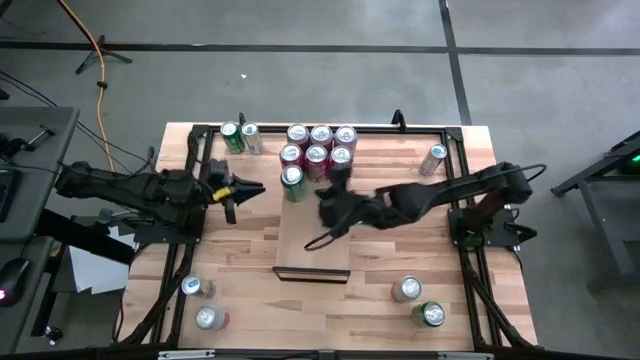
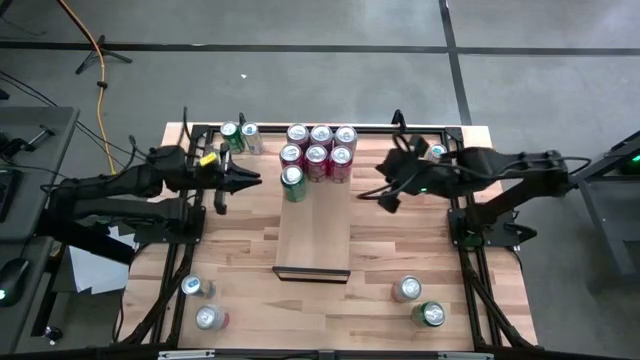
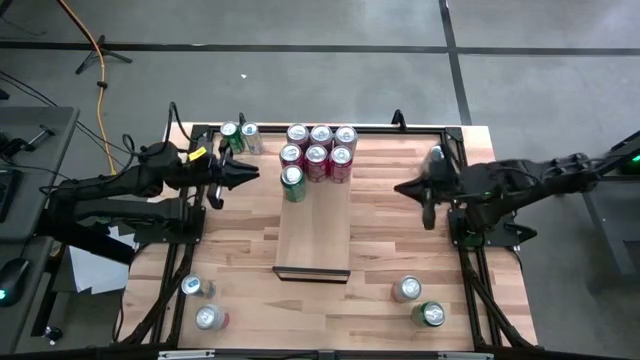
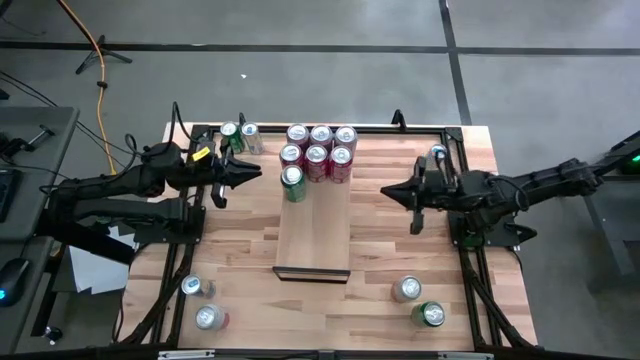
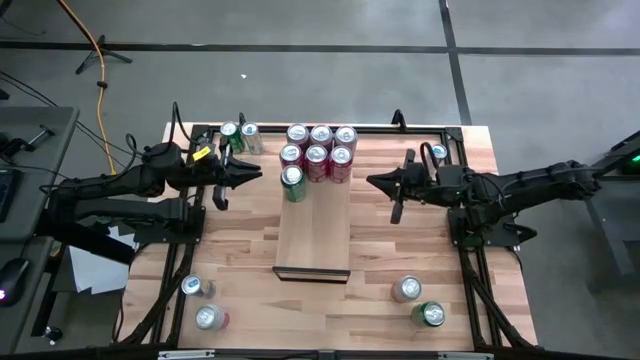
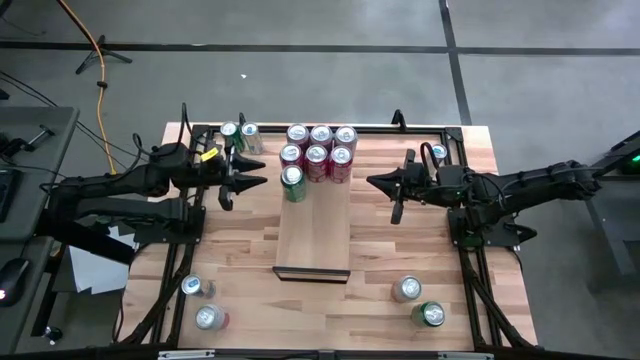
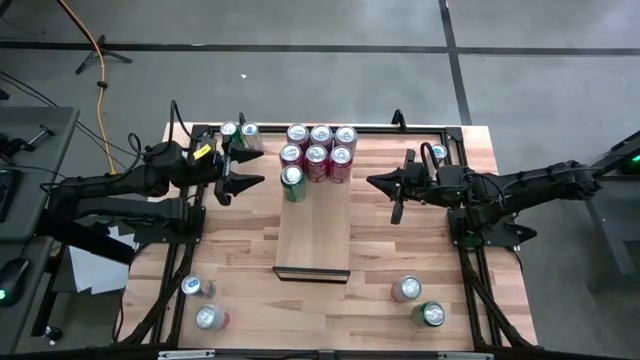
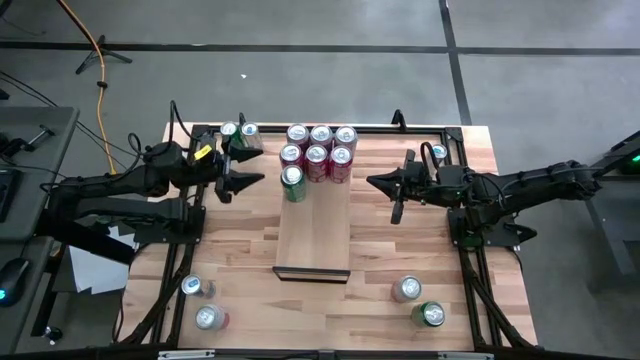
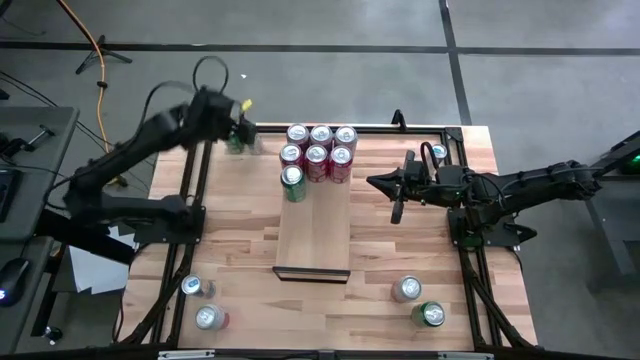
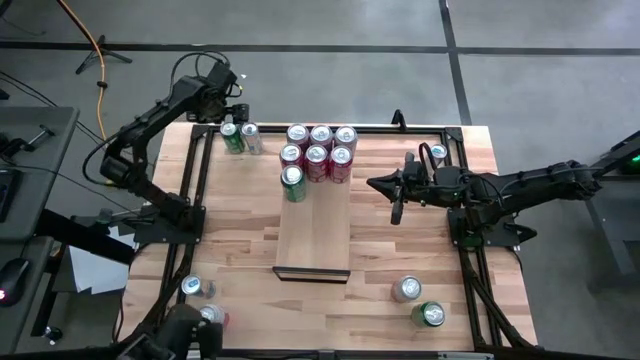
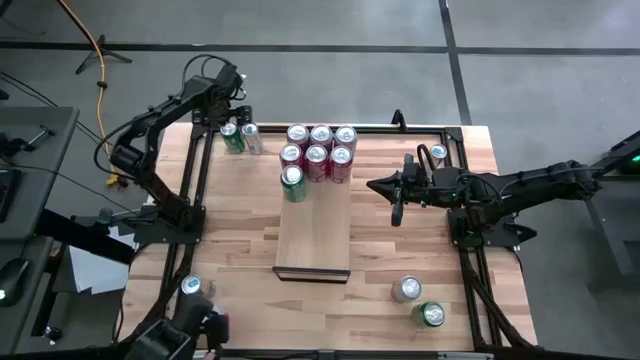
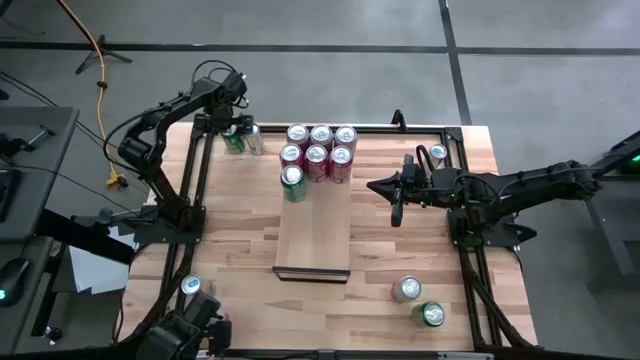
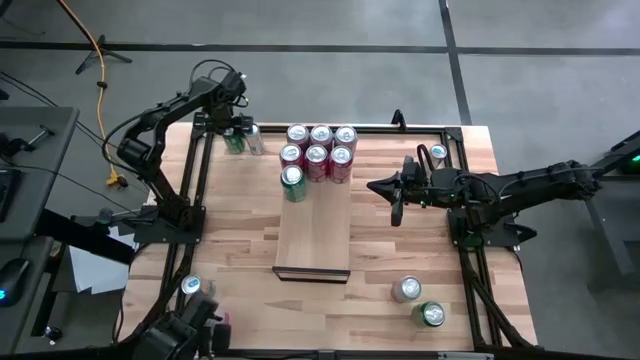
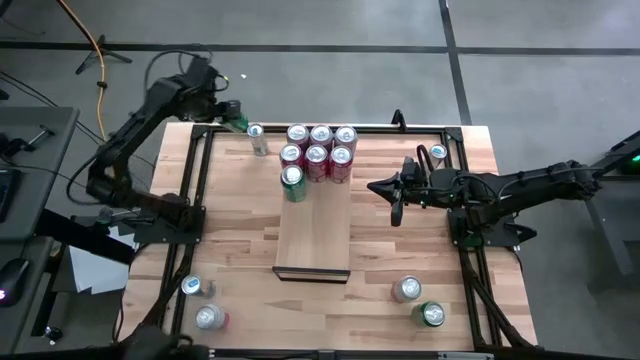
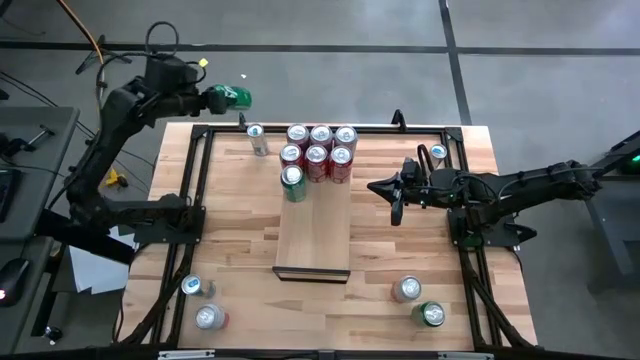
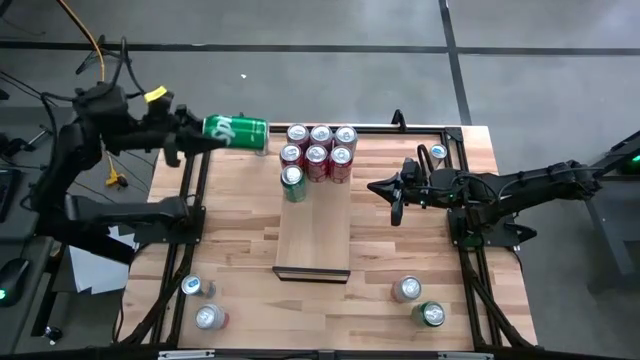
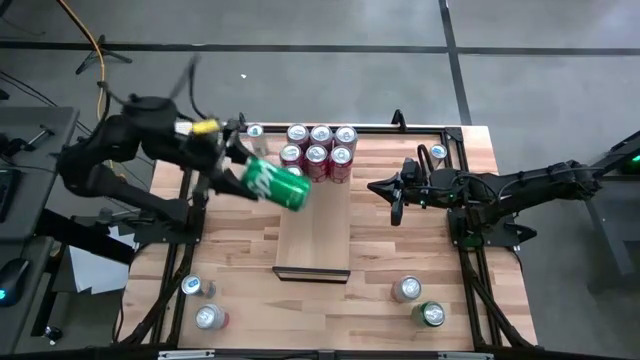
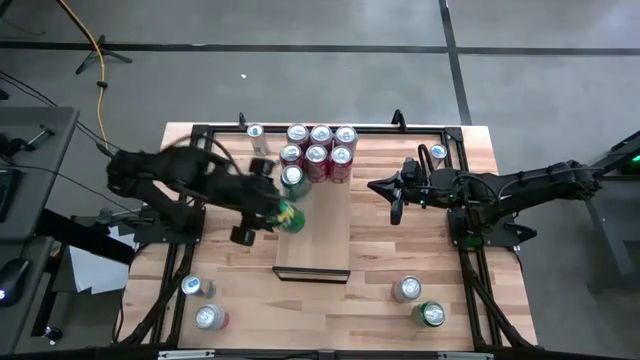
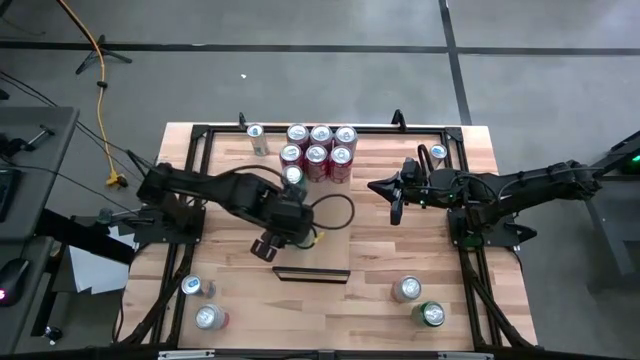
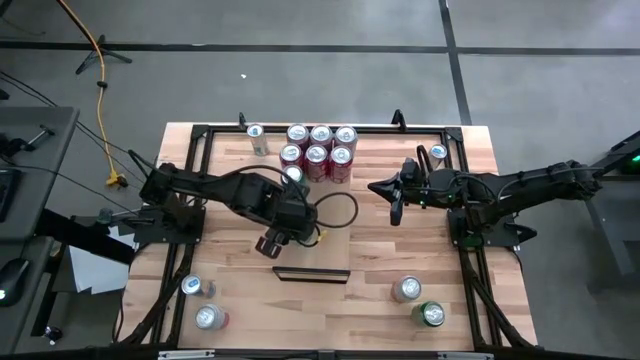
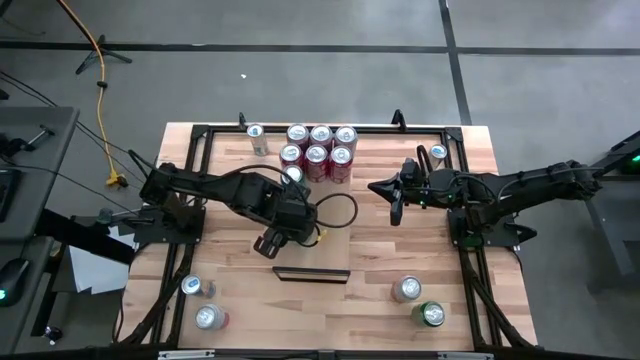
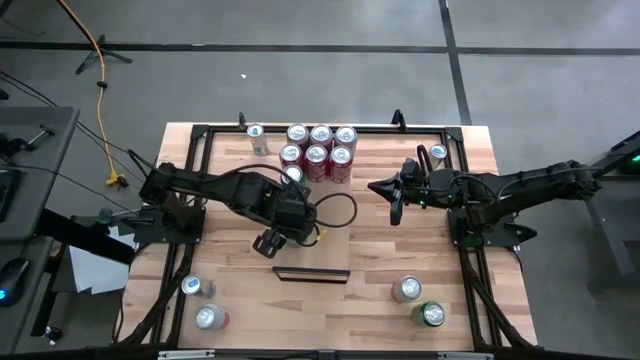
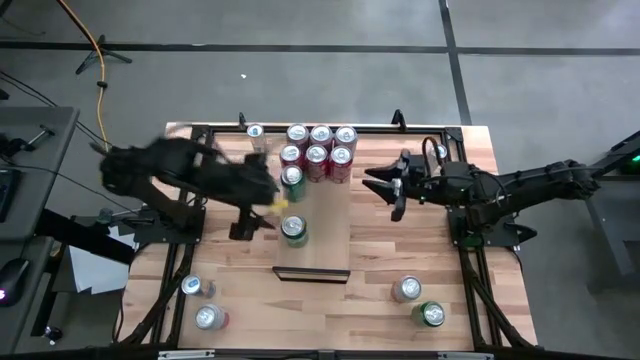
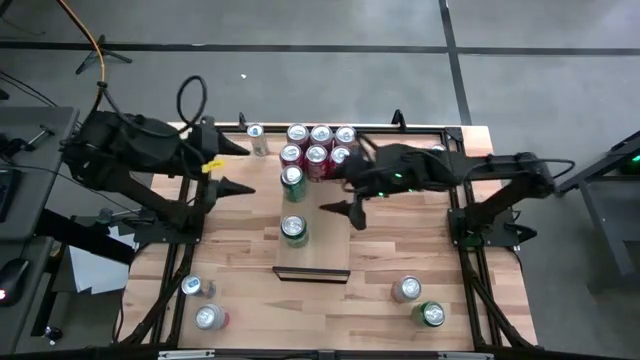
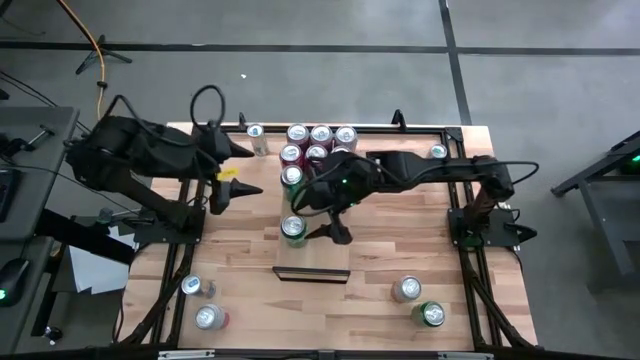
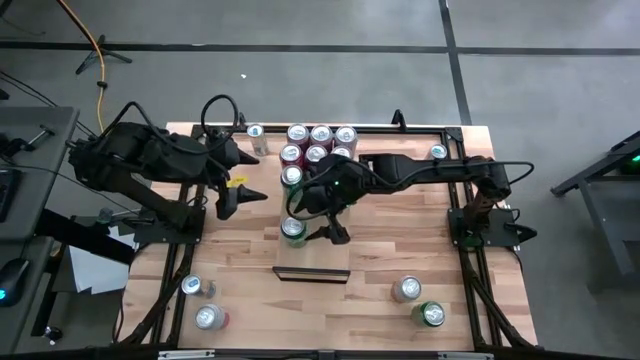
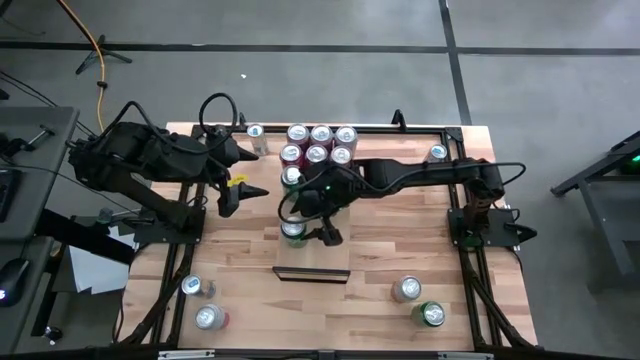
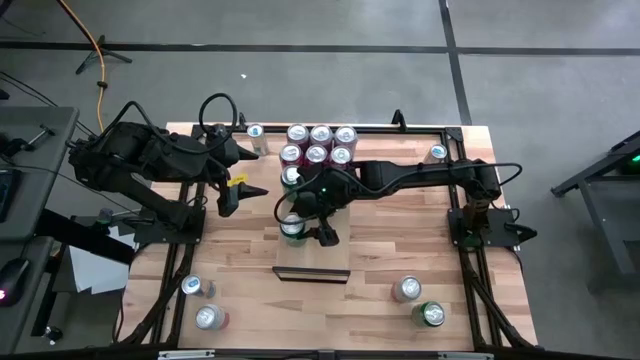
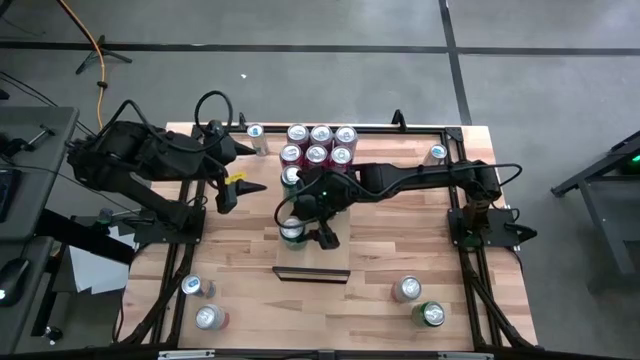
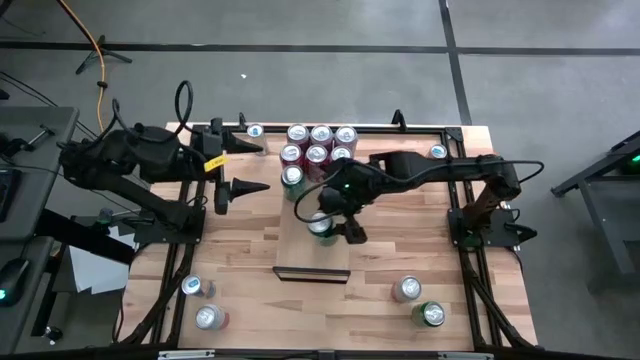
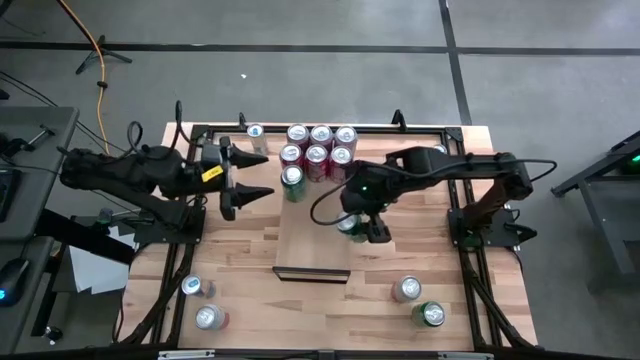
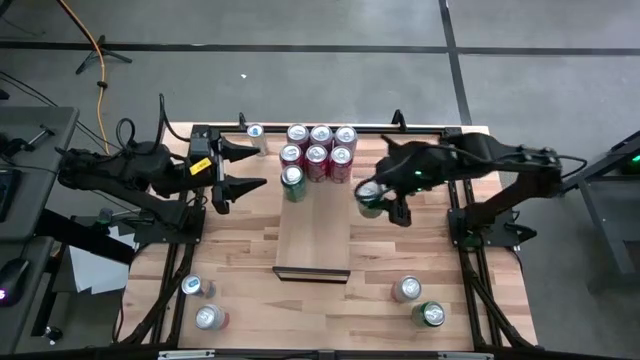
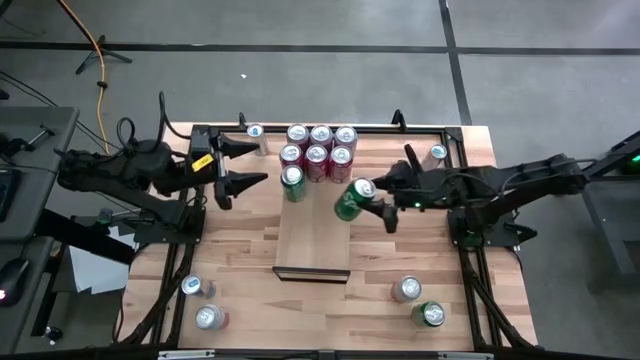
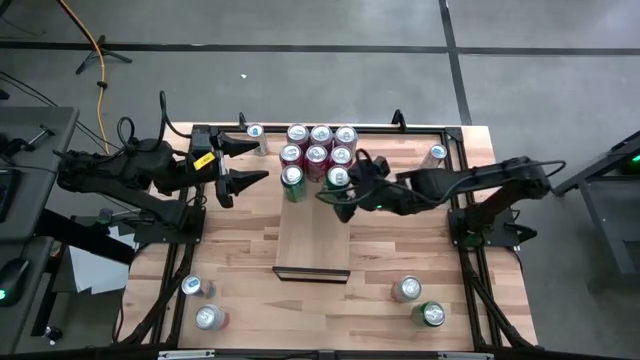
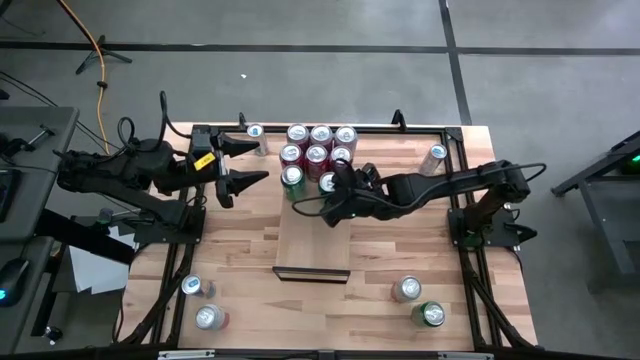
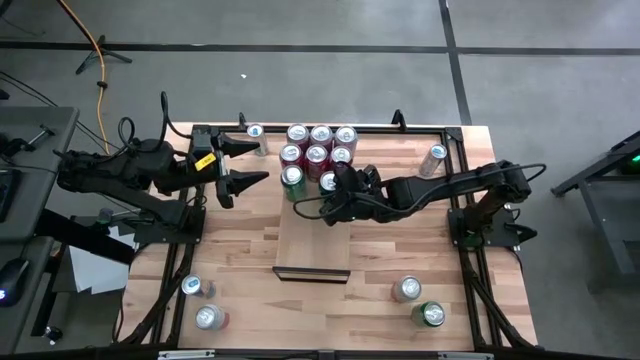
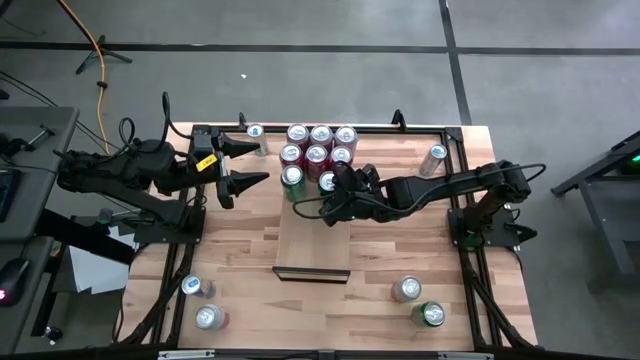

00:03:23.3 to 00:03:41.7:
Task: Place canned beverage on shelf
Put the top left green soda can on the shelf

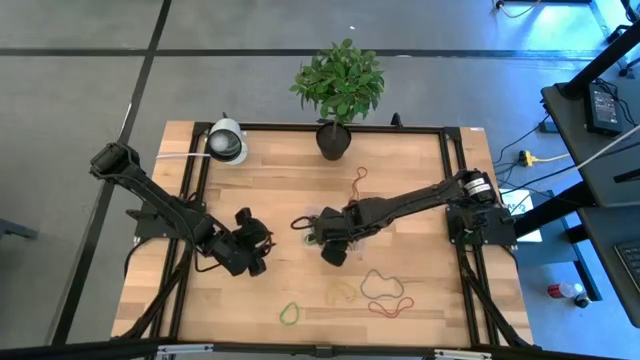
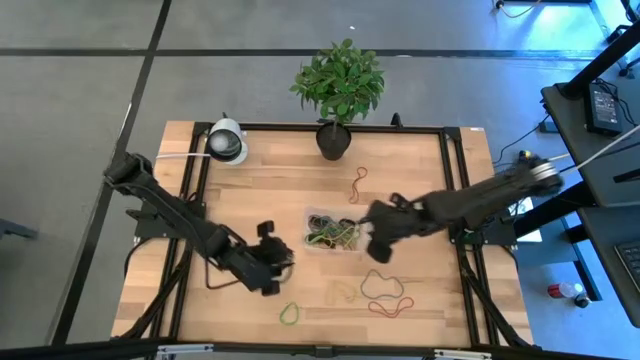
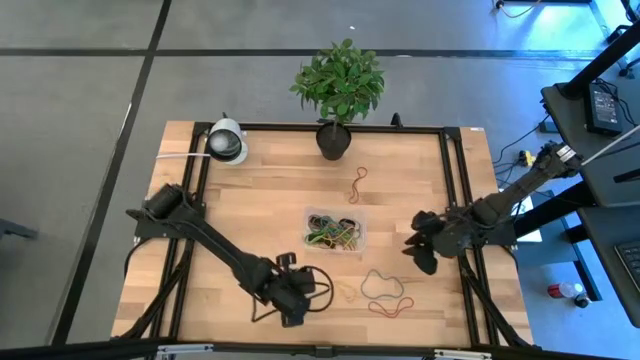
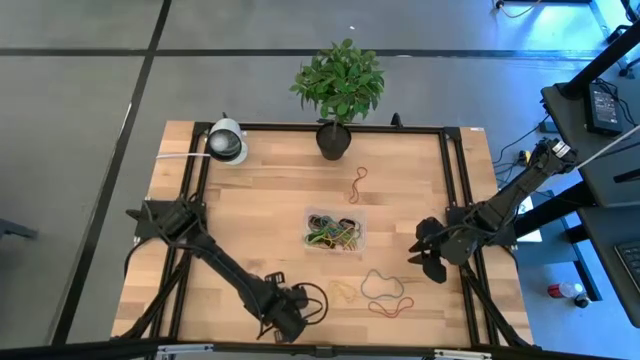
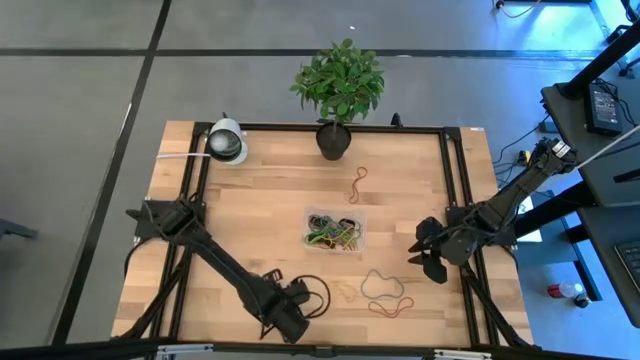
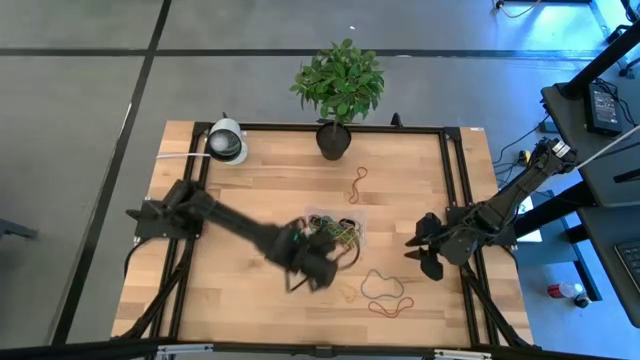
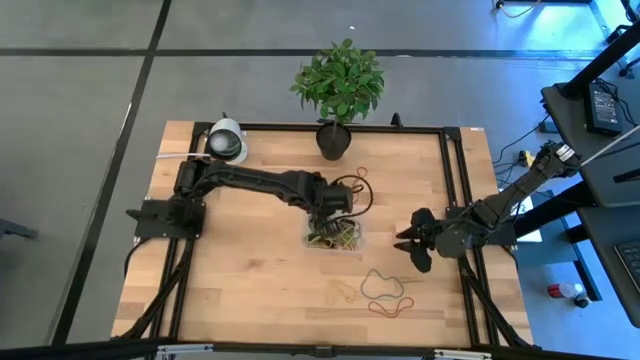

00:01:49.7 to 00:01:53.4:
Task: Pick and place rubber bands into bin
Put the green rubber band into the bin
